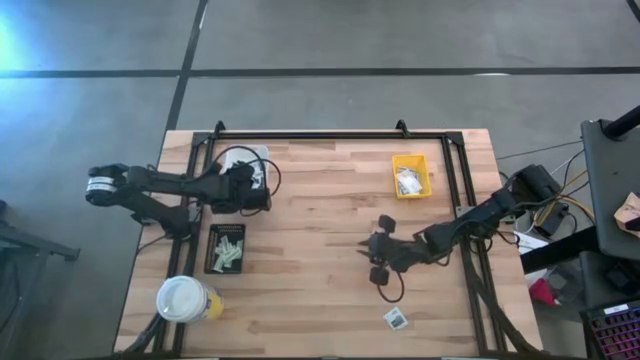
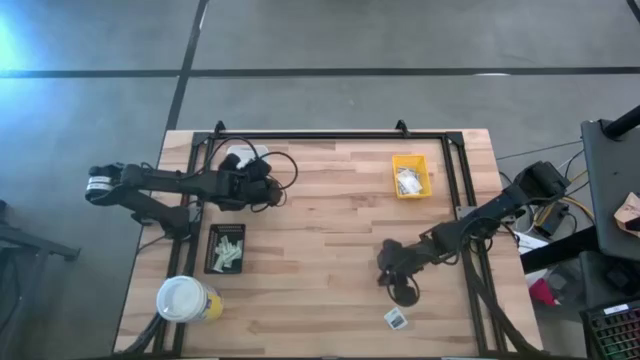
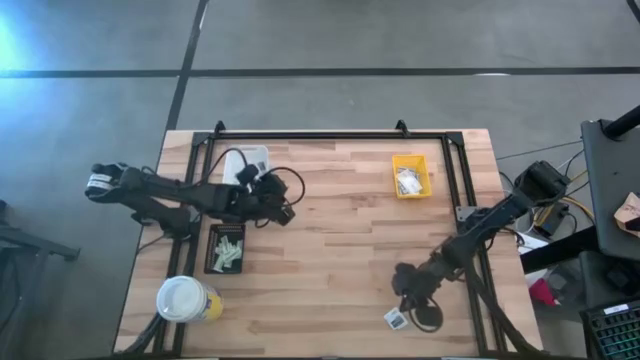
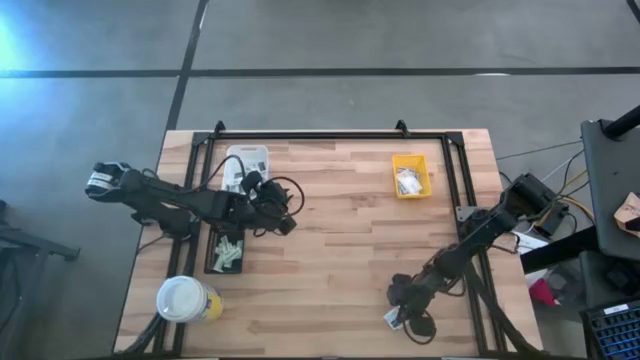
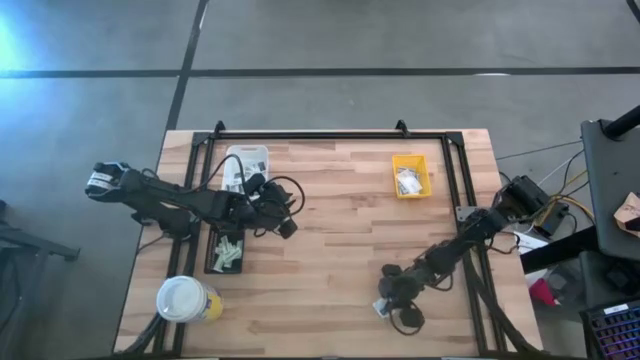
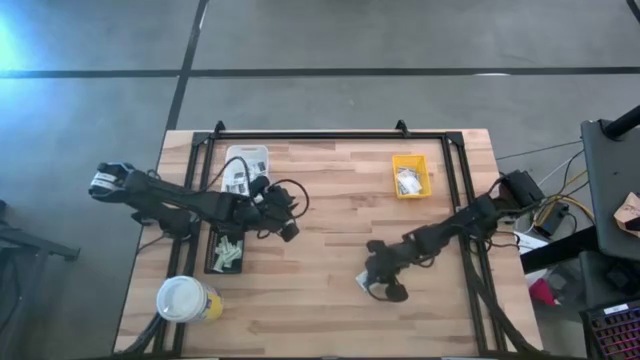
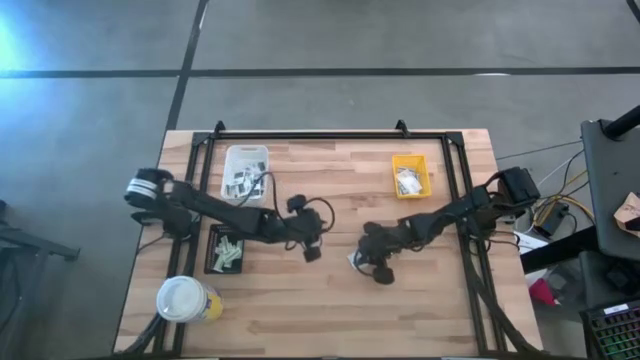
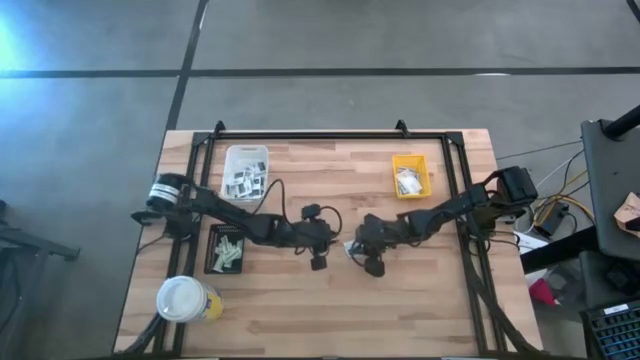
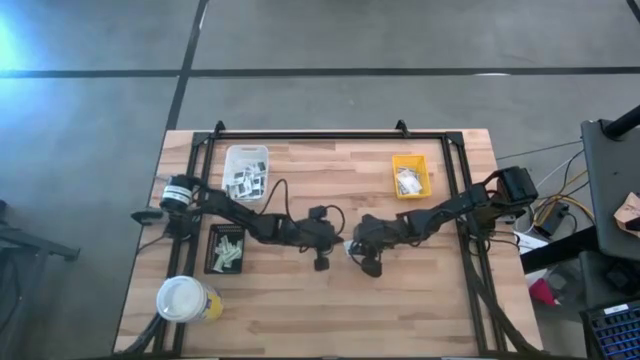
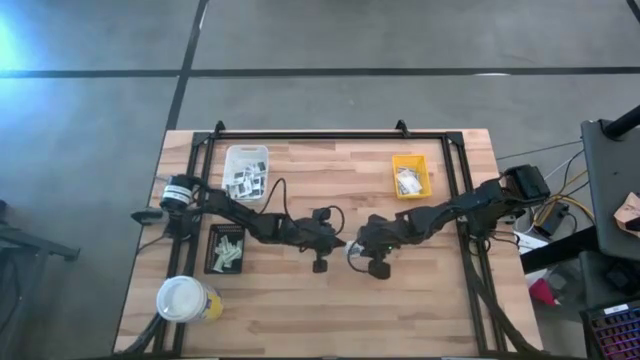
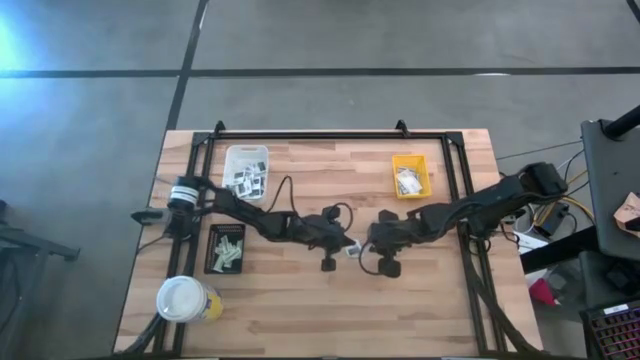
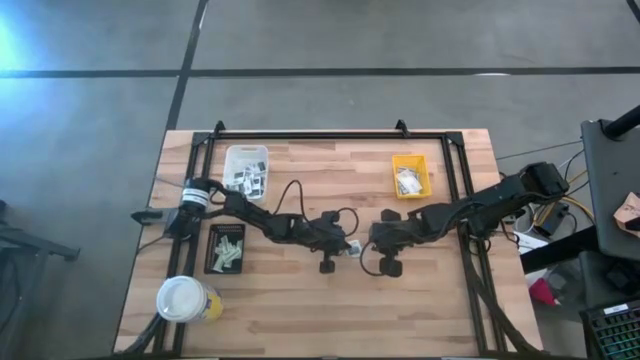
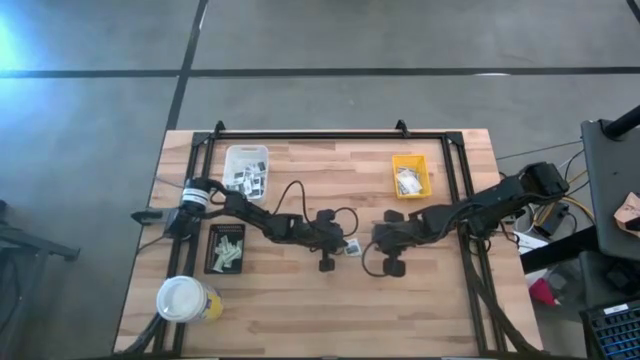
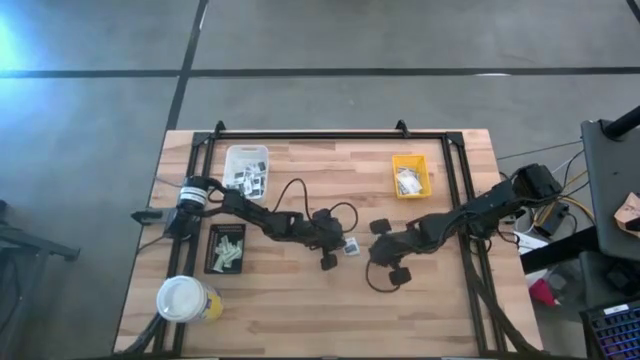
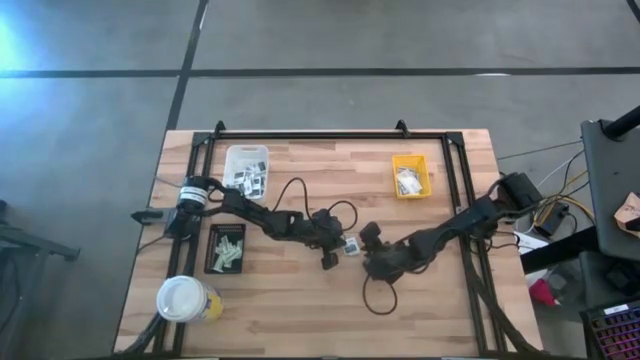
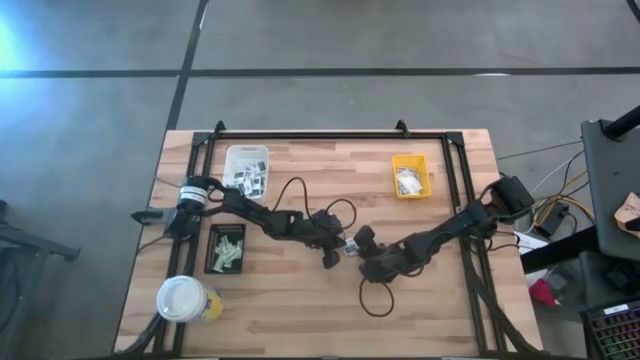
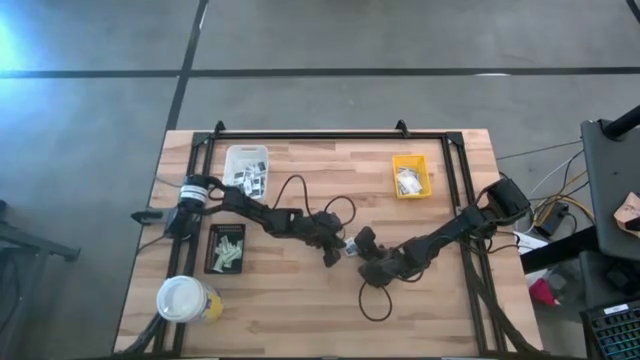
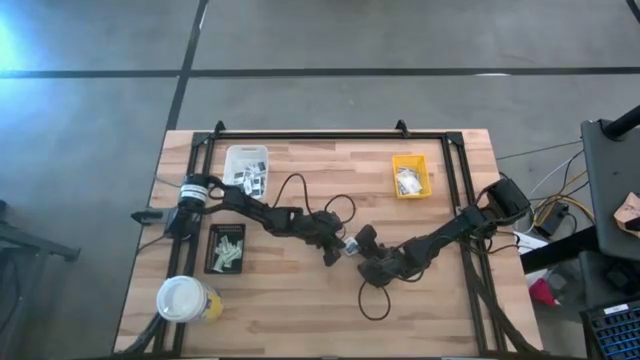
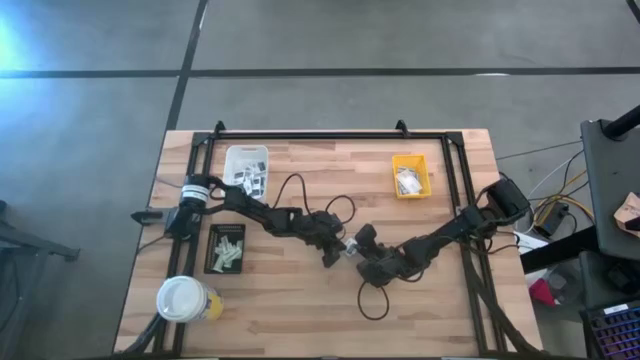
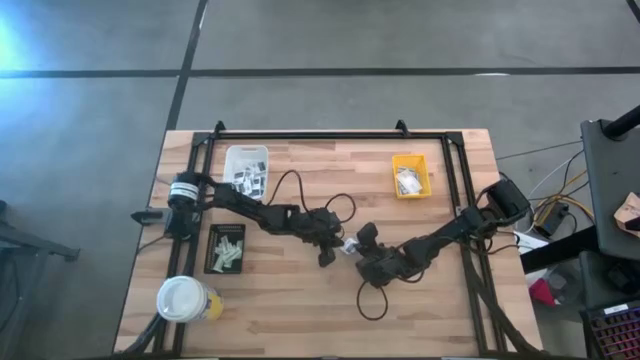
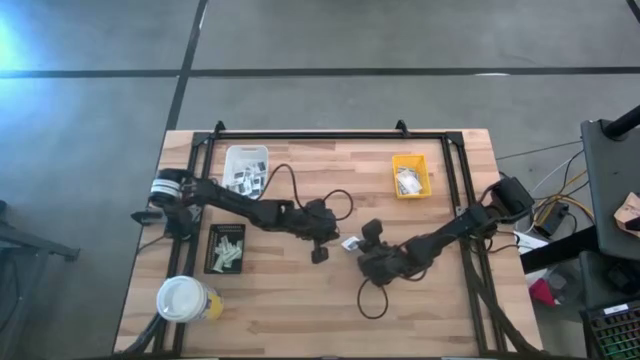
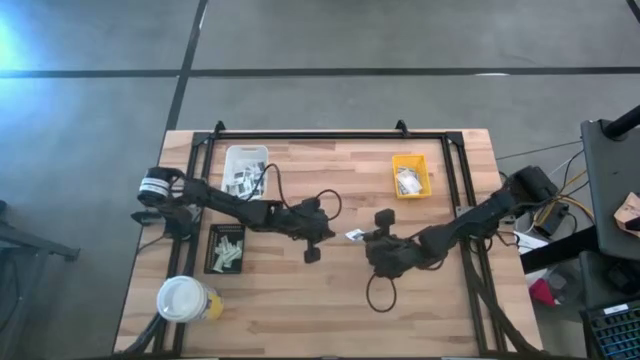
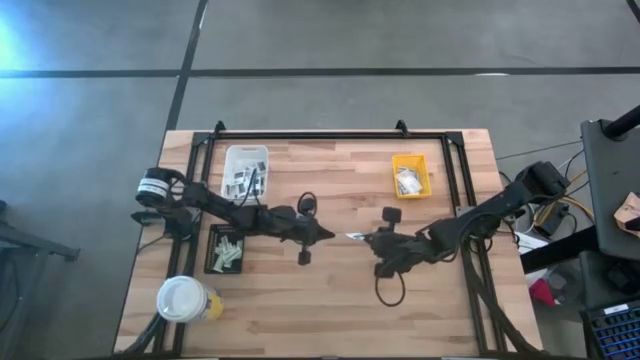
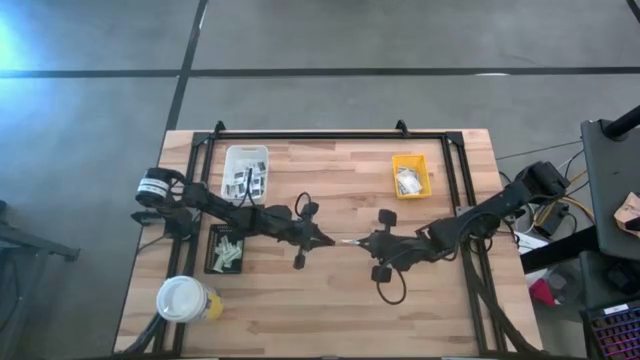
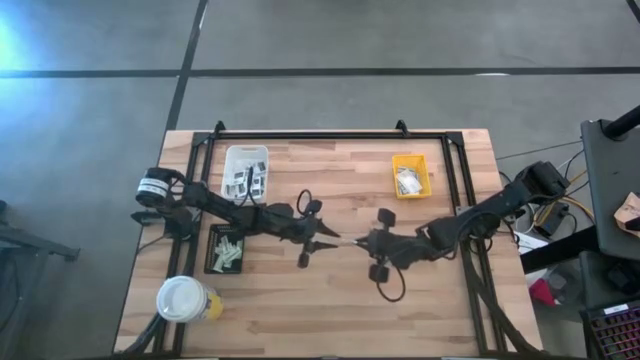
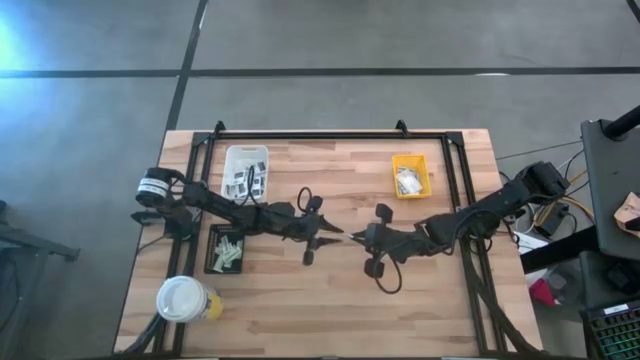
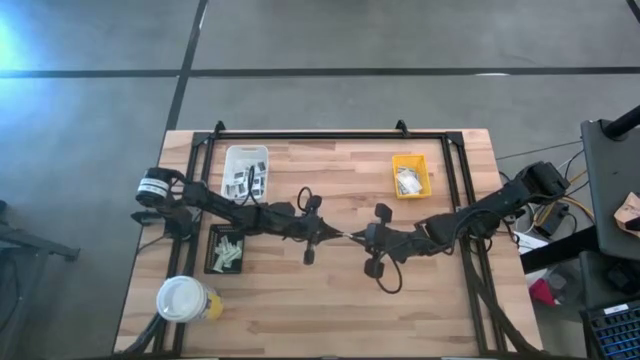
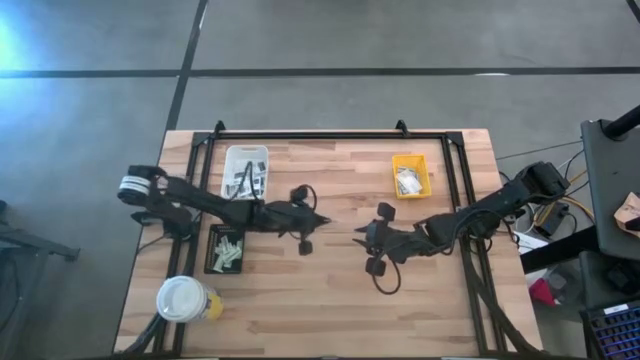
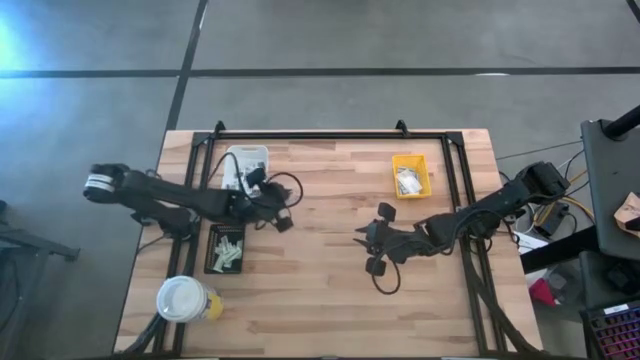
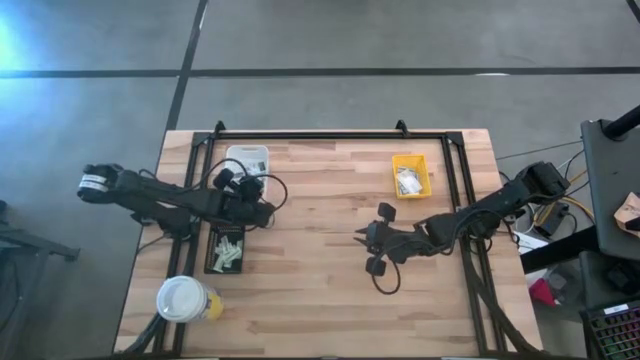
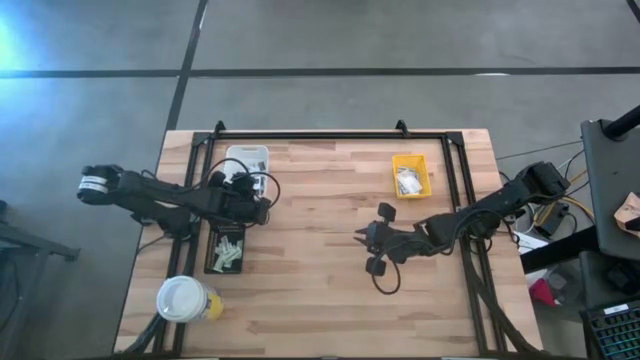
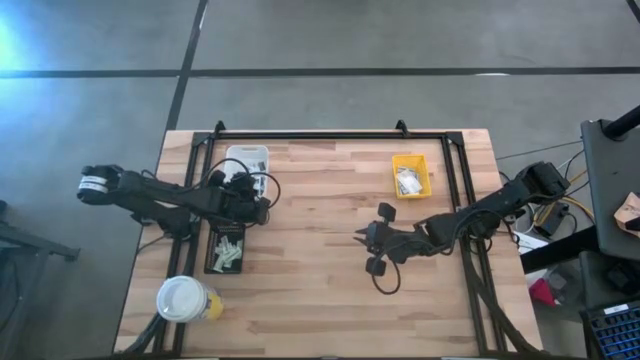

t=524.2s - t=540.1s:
Task: Pick & Place First Aid Supplies
Put the gray towelette pack into the white bin

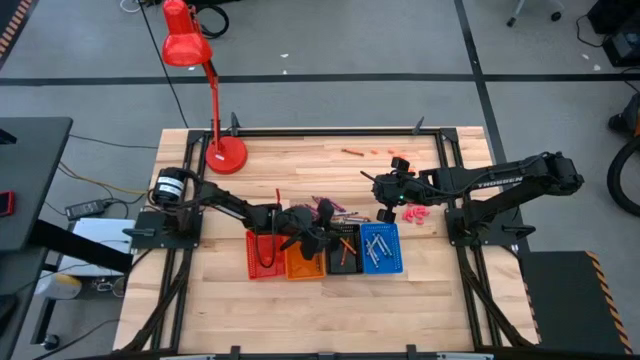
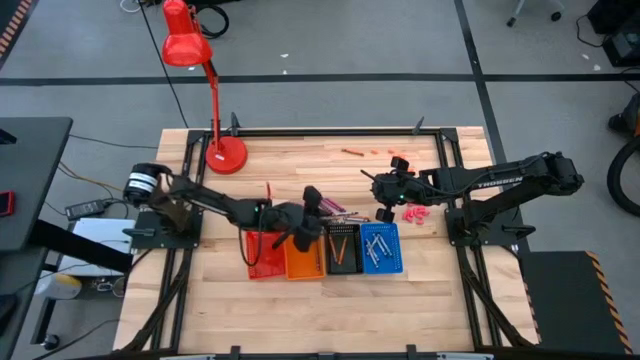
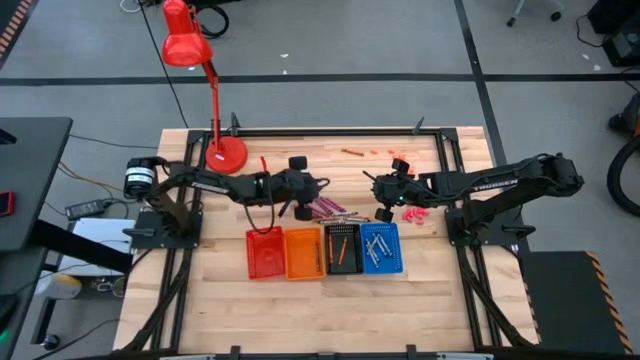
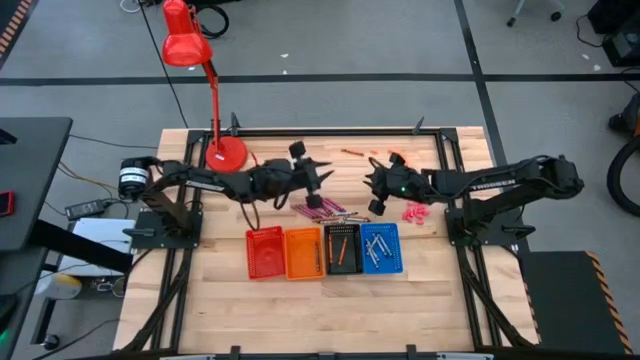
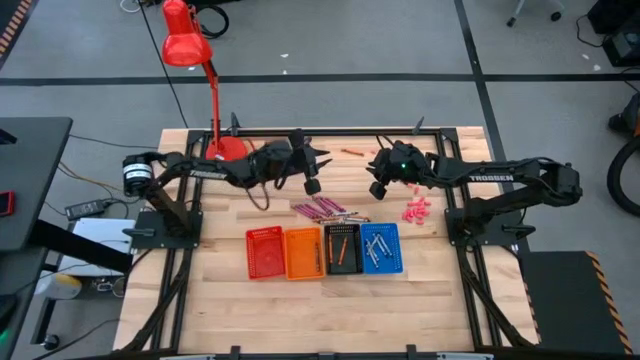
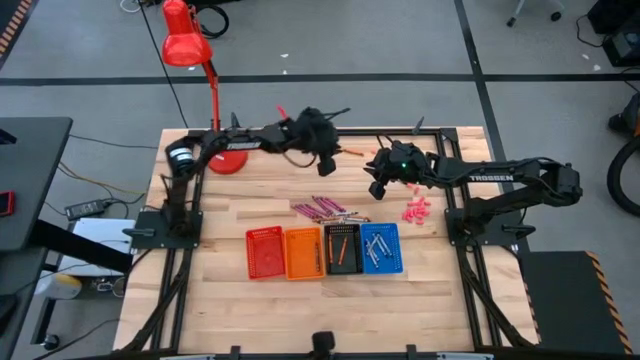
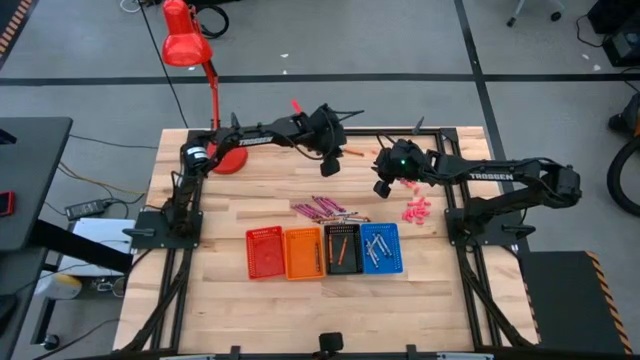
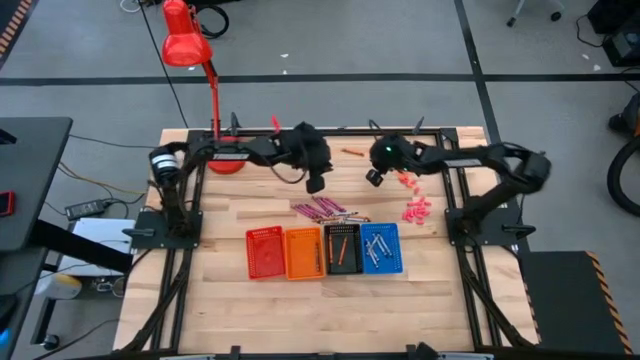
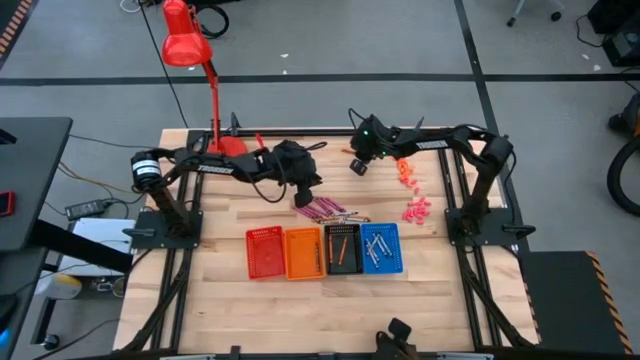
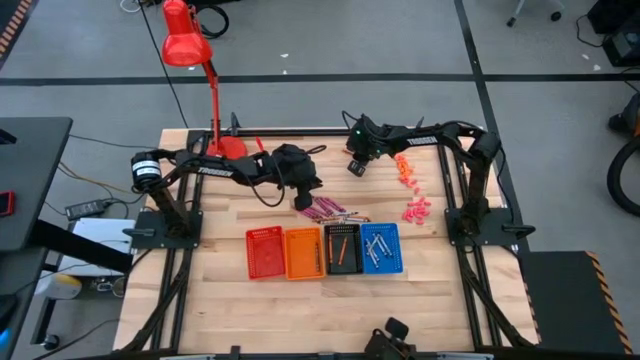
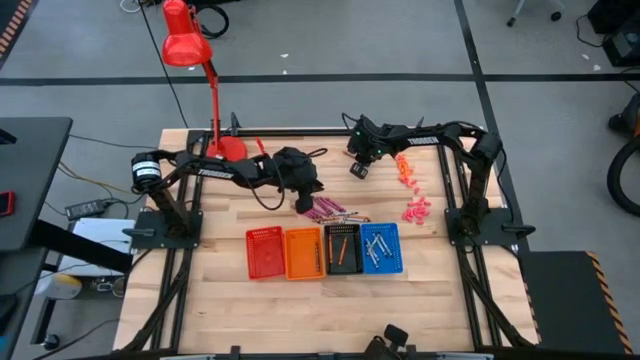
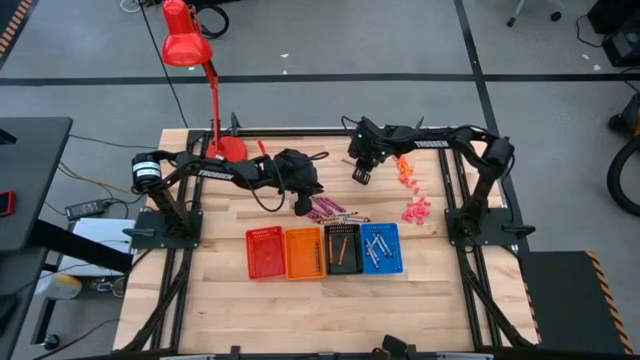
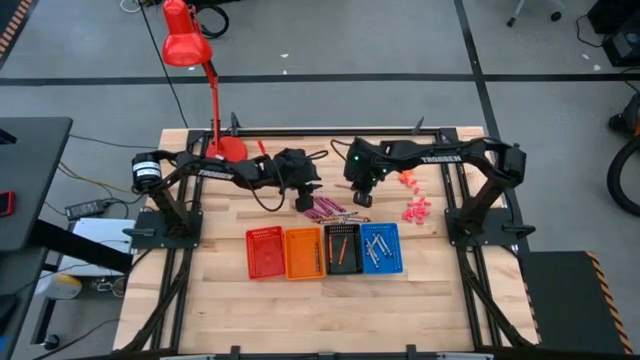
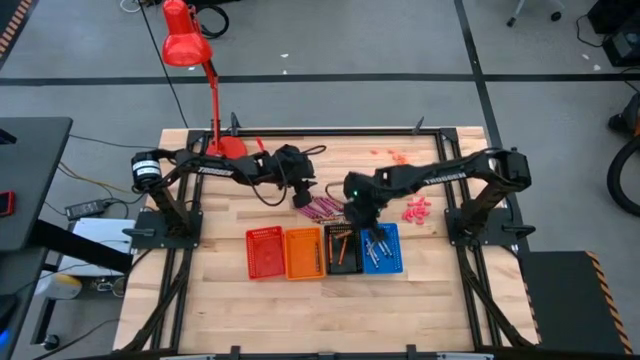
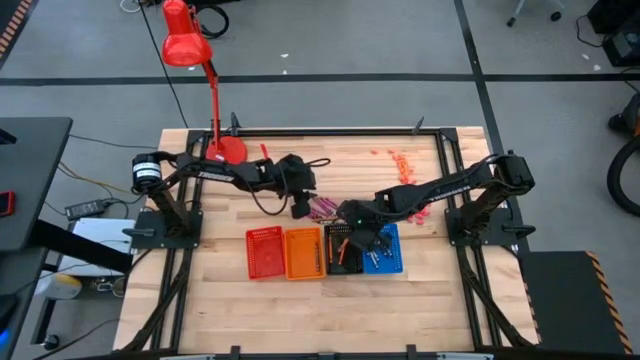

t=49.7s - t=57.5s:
Task: Sort crayons
Put the orange crayon into the black bin
